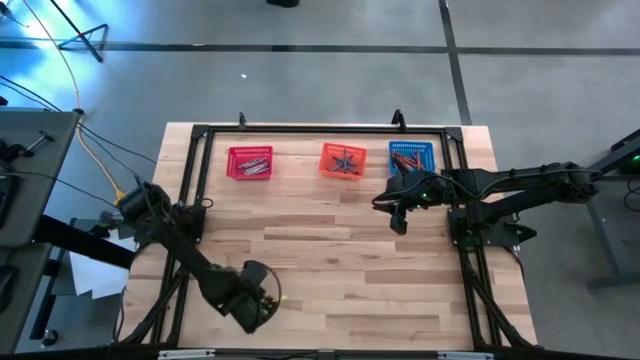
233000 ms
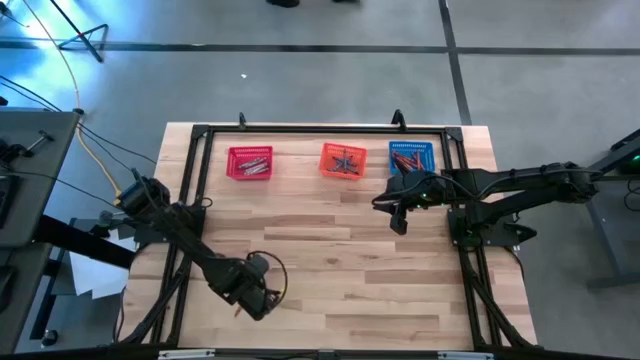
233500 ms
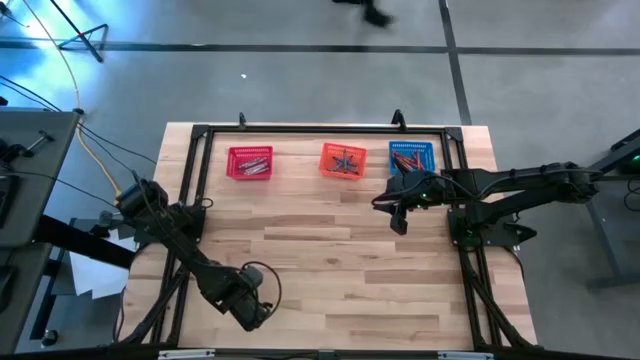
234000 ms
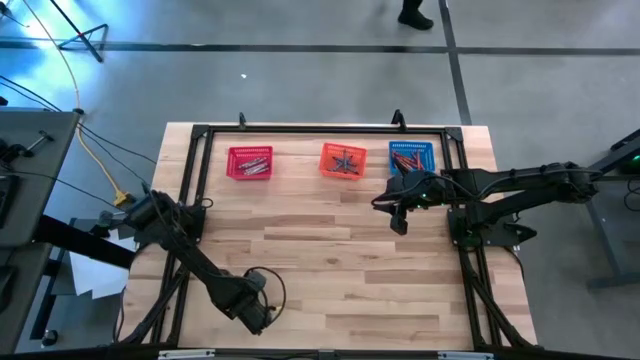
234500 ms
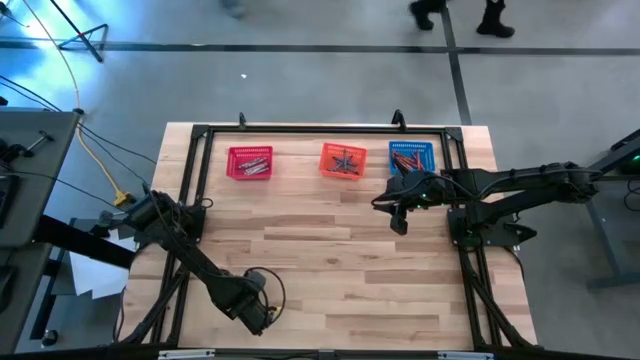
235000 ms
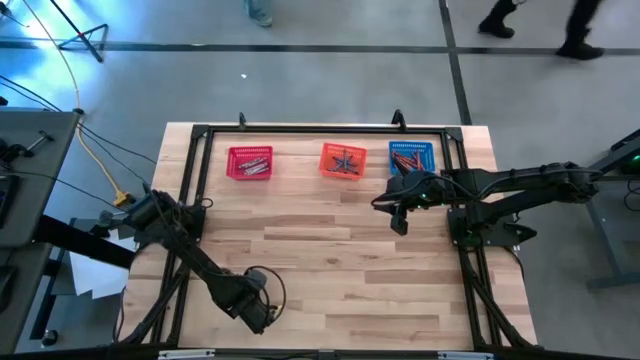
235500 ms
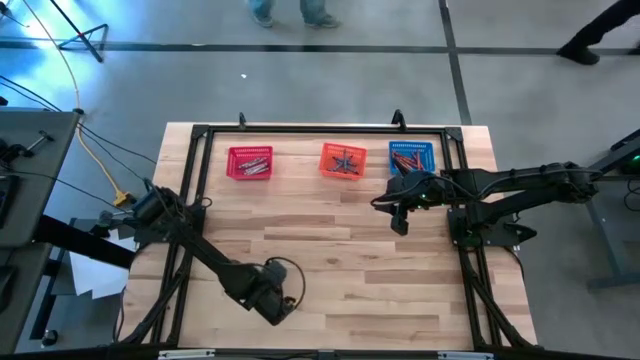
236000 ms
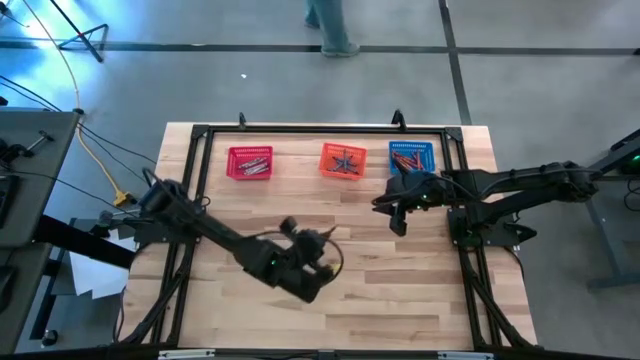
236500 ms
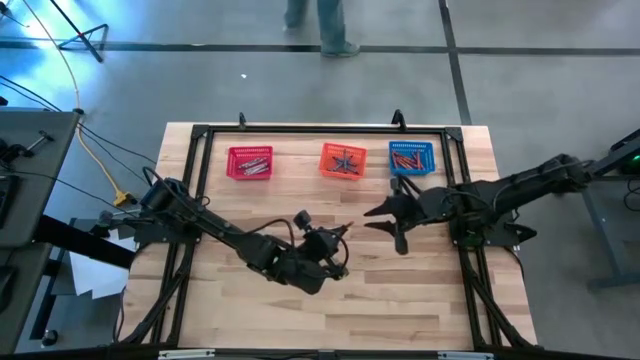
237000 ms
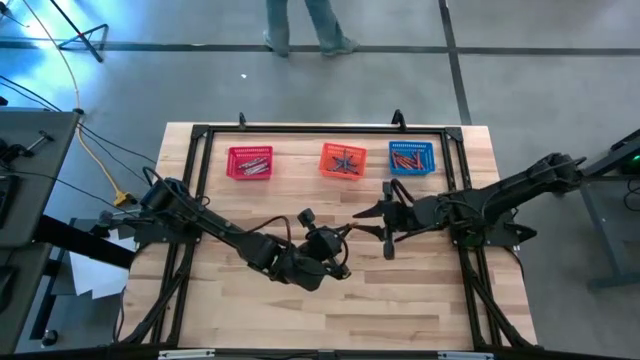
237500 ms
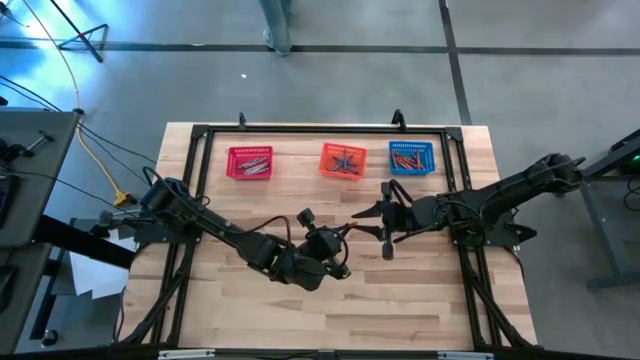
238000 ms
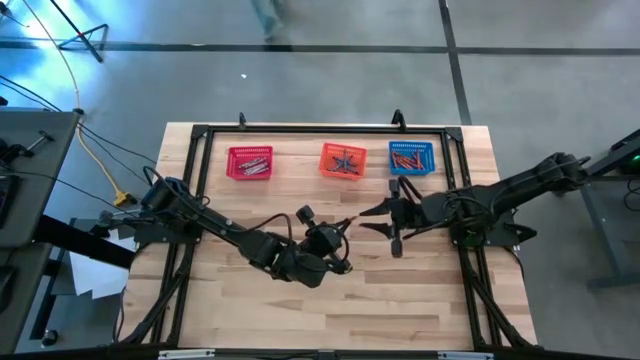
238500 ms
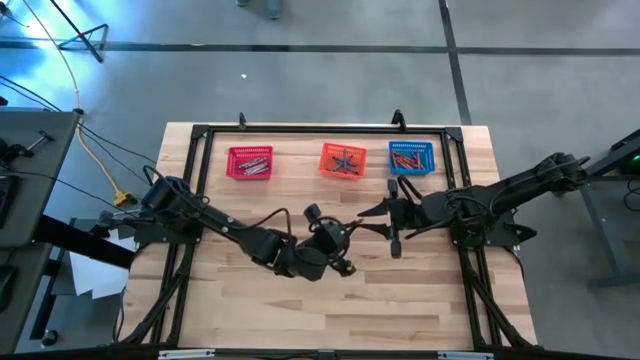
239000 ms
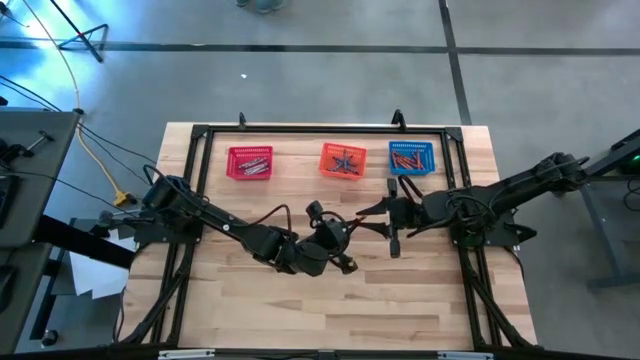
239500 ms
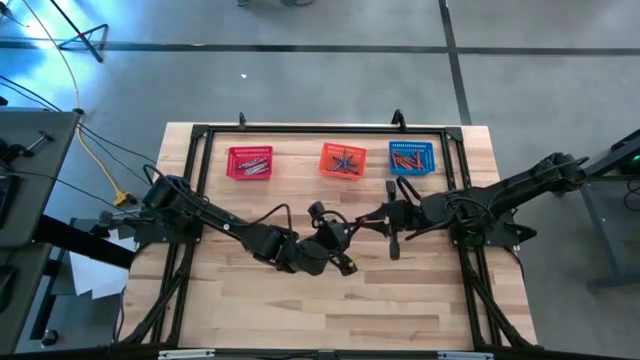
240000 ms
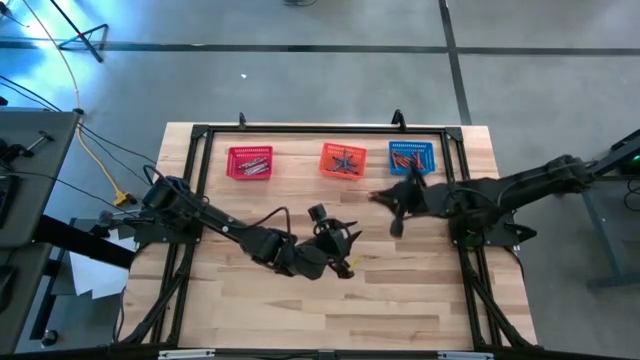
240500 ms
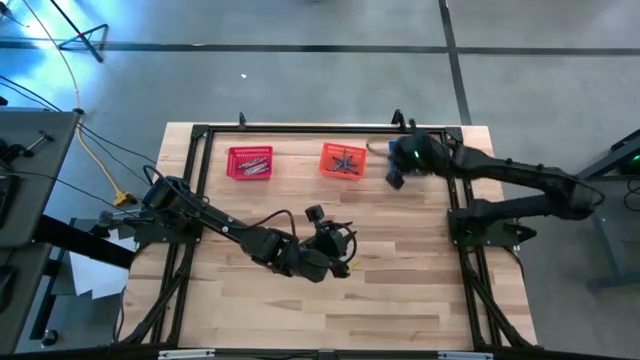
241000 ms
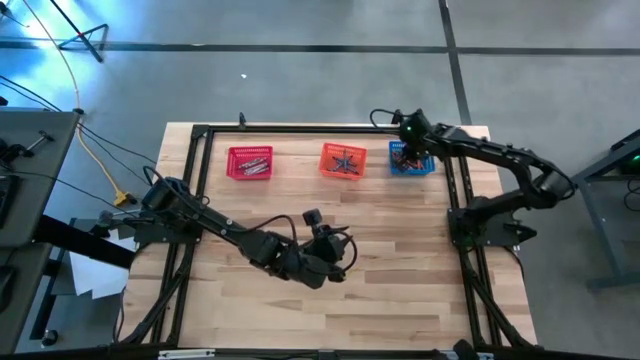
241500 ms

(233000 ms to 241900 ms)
Task: Sort crayons
Put the orange crayon into the blue bin

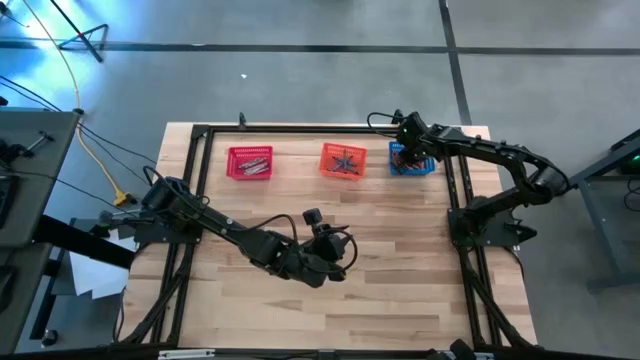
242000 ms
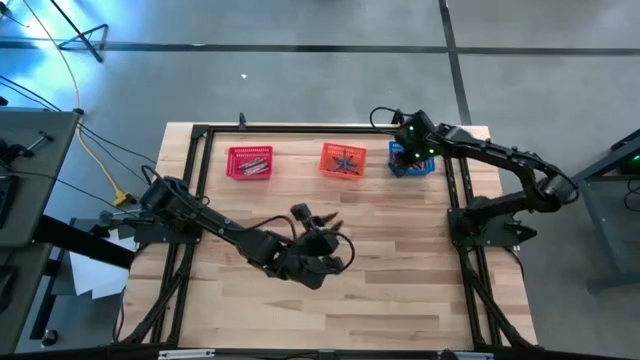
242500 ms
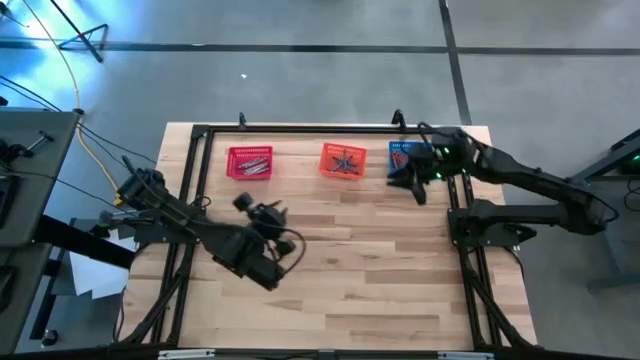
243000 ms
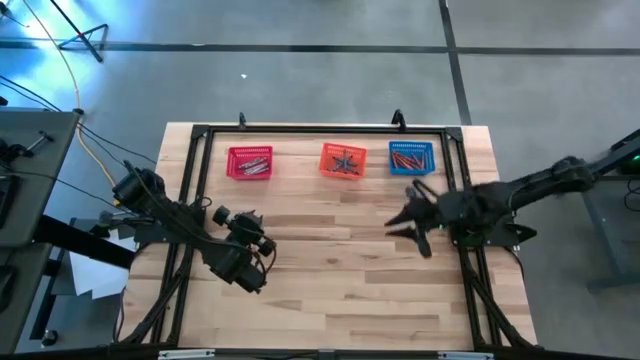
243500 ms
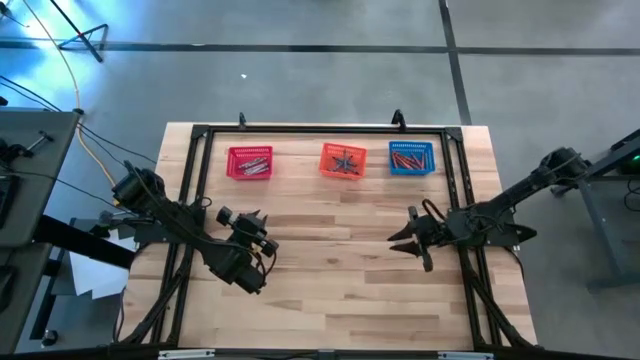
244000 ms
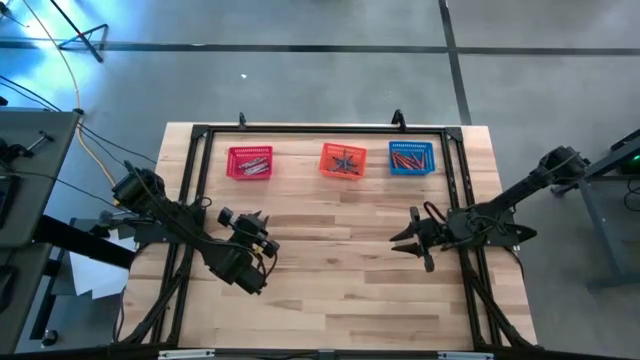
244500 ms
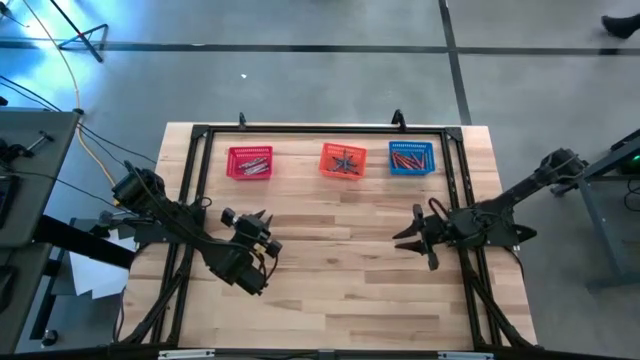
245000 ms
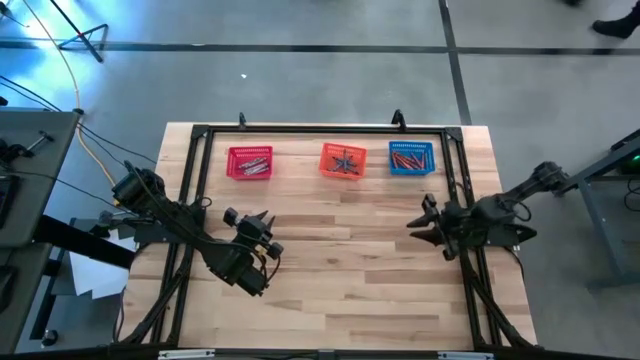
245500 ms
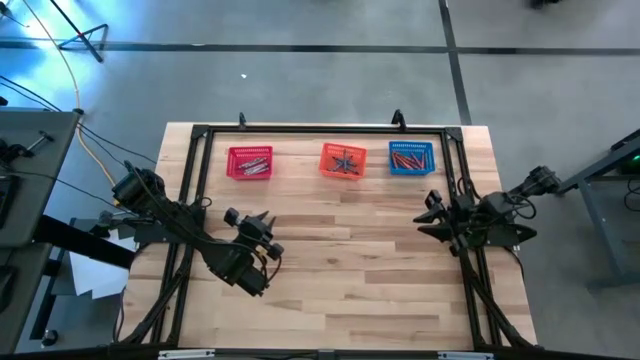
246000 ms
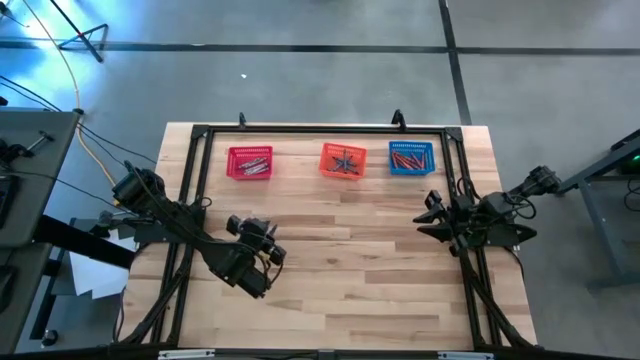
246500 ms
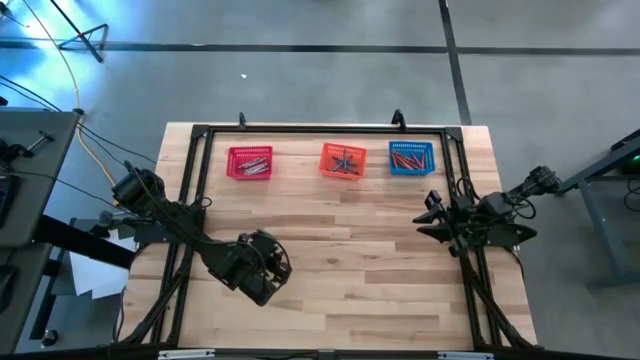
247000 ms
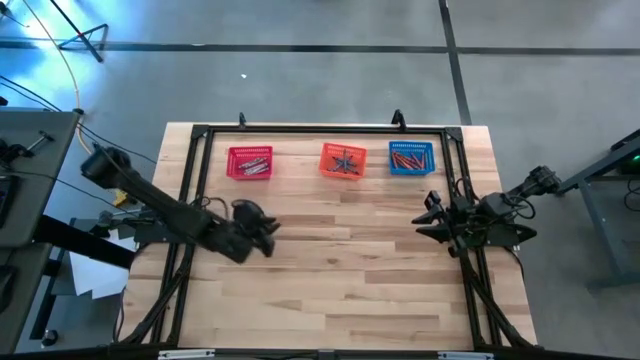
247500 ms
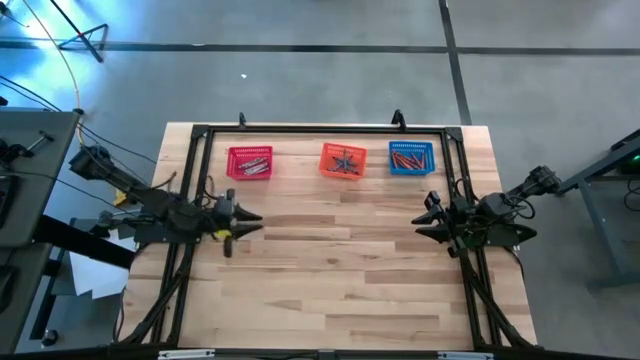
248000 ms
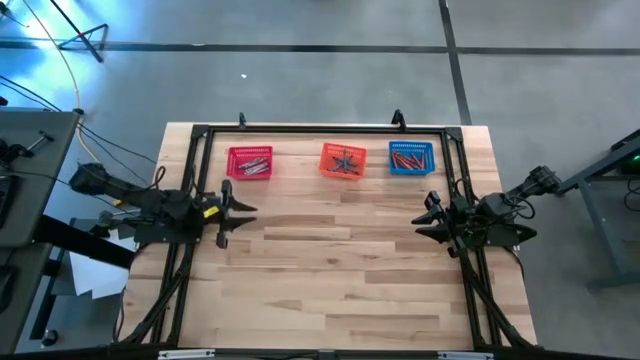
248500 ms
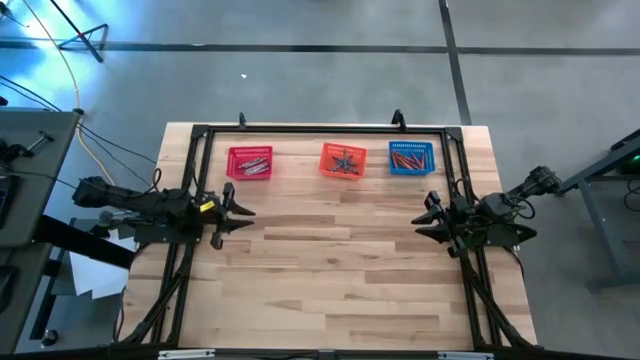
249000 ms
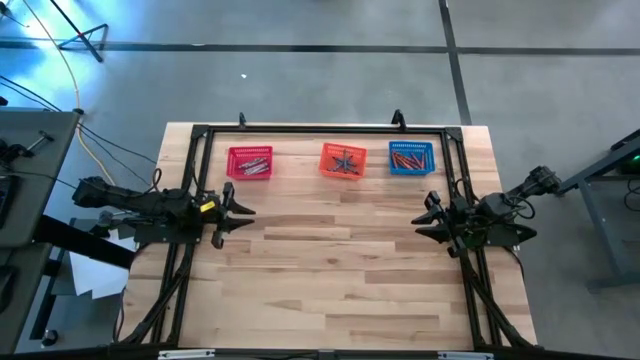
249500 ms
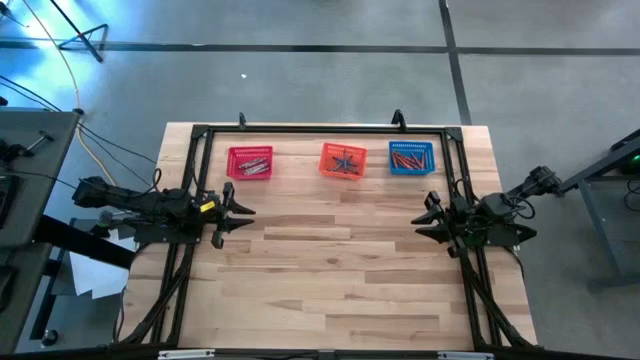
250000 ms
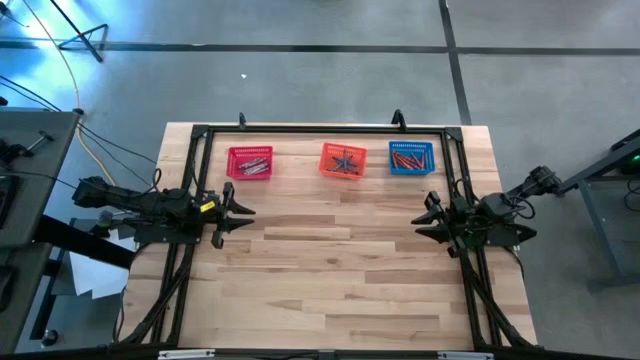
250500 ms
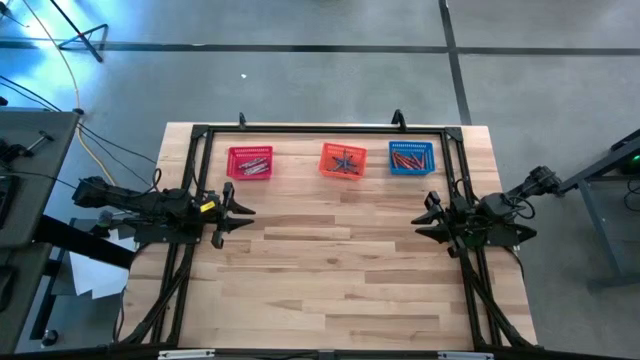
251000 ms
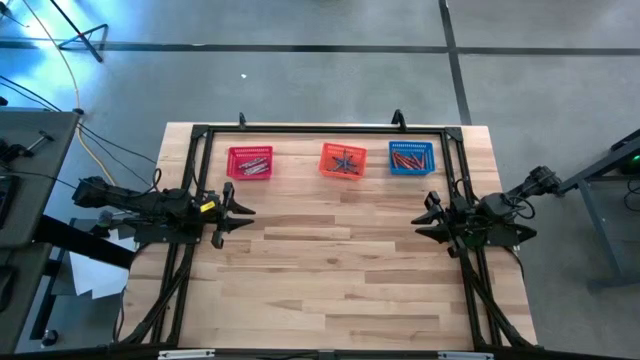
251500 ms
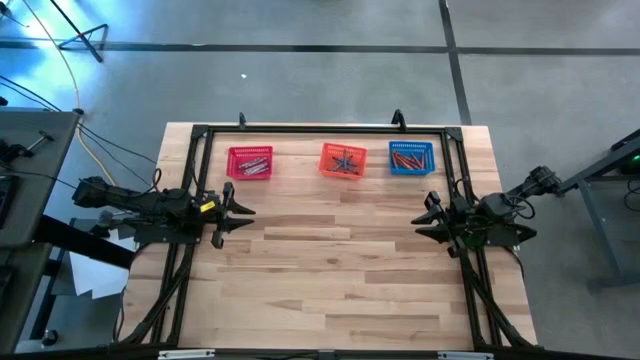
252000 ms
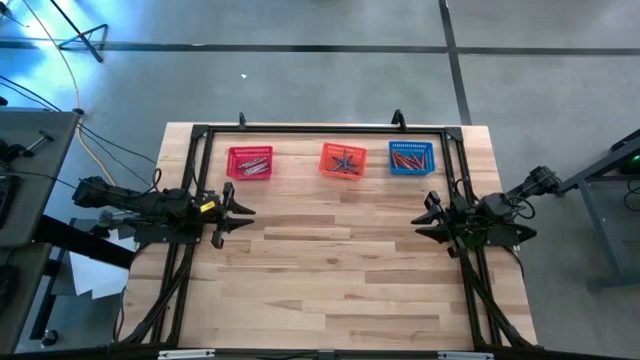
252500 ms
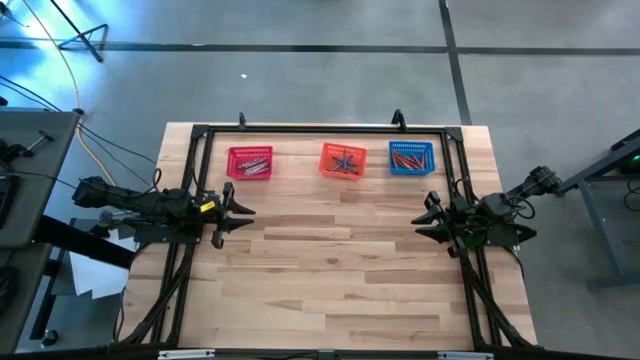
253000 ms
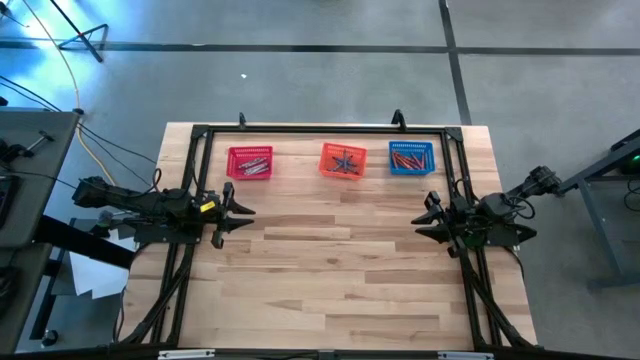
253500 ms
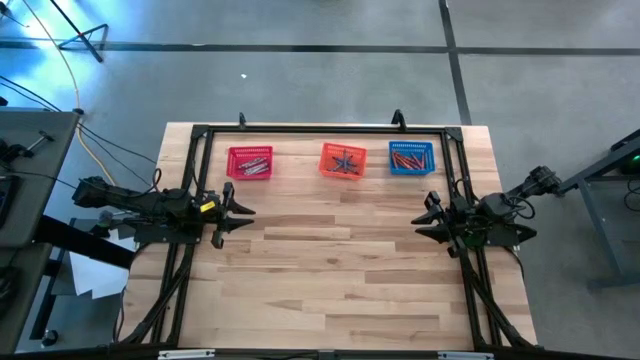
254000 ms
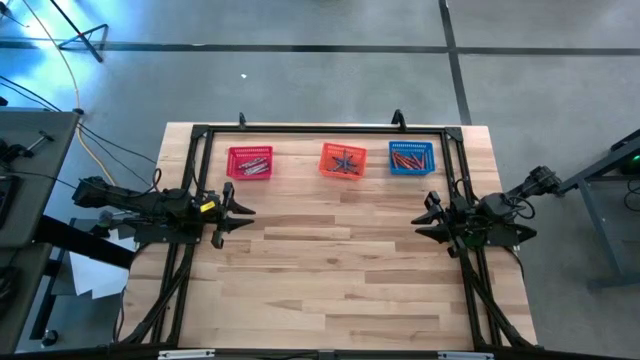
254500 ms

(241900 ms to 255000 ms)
Return to Home Position
